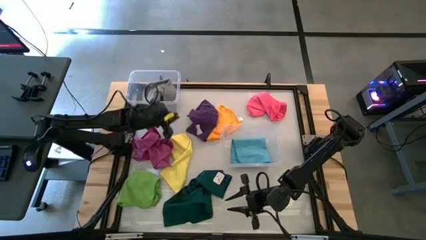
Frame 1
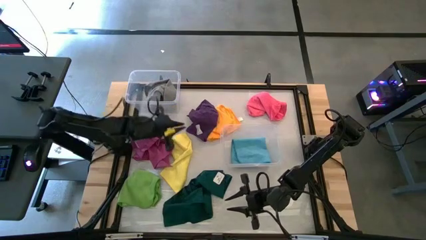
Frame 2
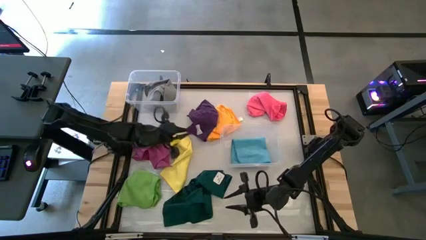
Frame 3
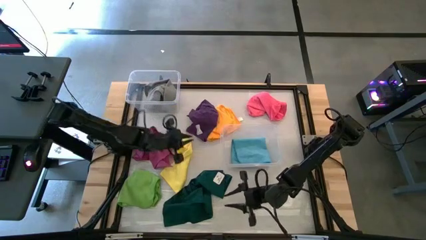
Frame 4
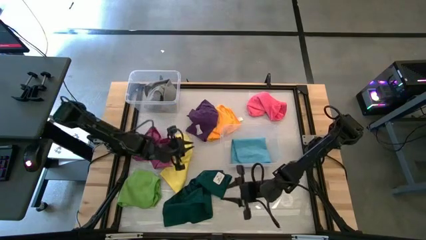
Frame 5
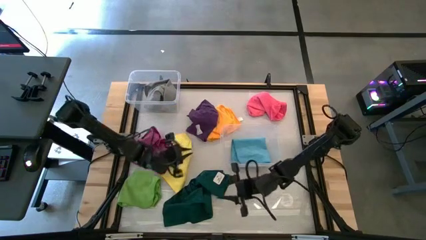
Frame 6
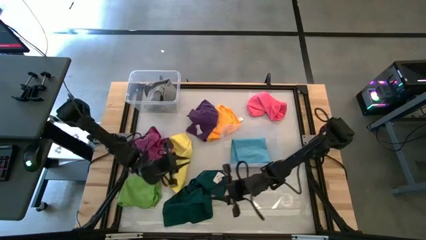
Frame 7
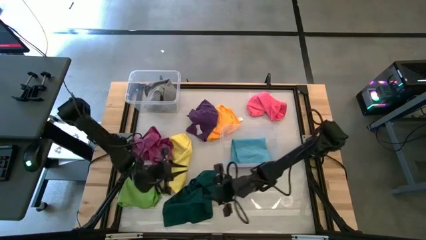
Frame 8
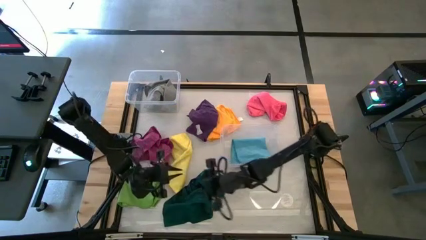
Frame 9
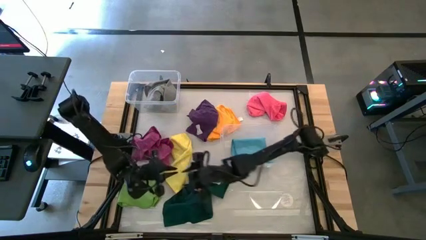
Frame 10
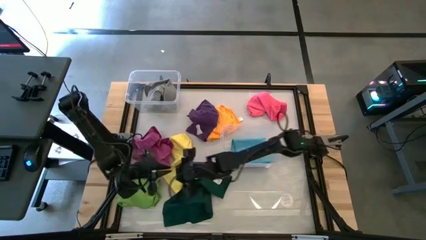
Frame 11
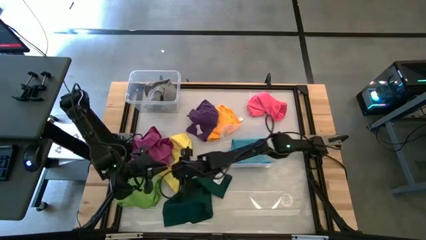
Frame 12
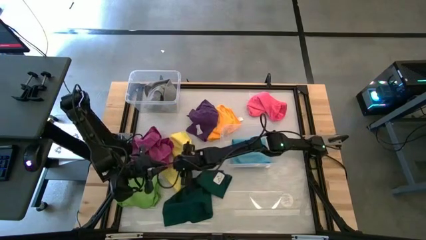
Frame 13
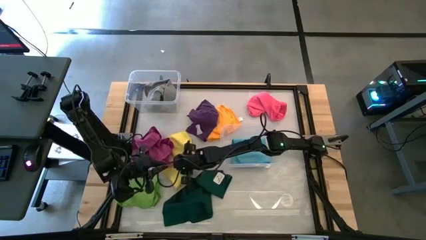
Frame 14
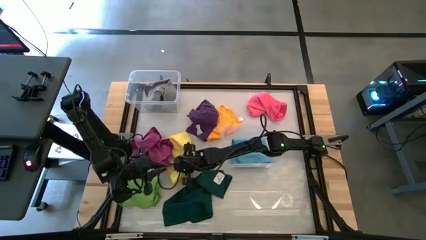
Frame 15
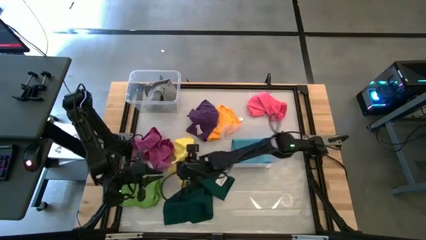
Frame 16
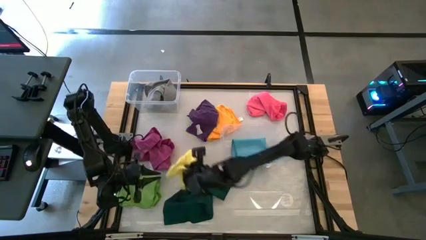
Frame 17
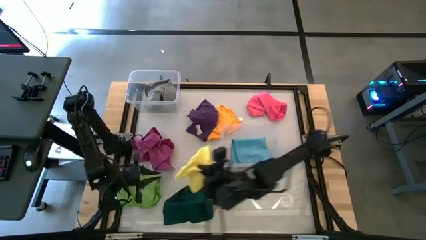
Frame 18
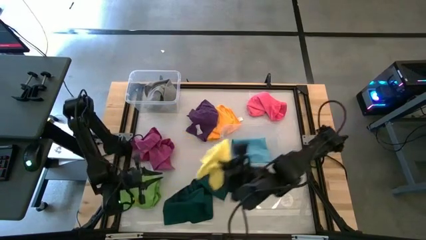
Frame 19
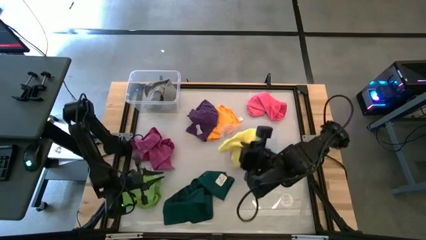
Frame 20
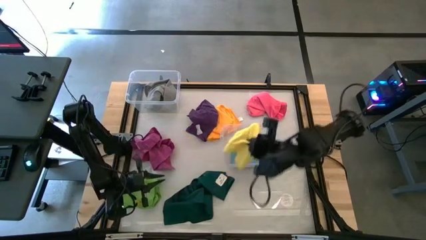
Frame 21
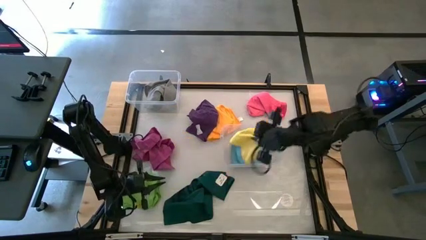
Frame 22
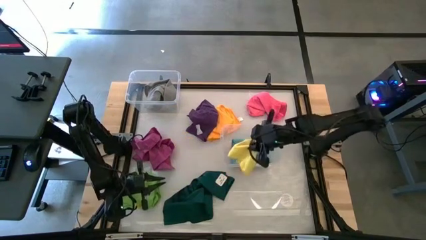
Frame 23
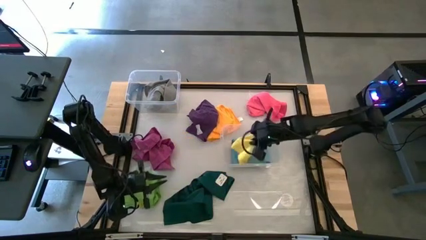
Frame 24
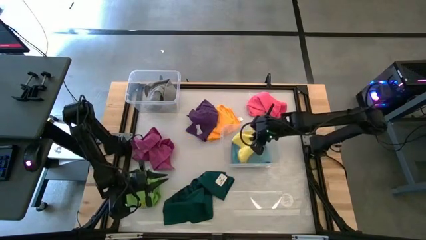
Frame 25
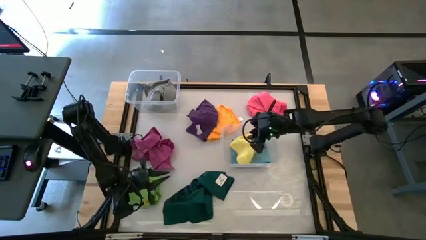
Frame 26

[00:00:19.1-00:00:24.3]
Task: Sort towels by color in basket
Put the yellow towel into the bottom transparent bin

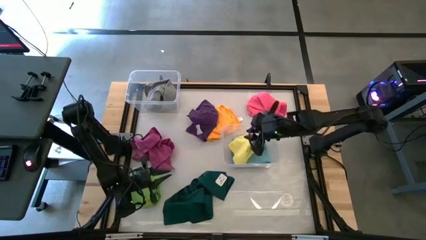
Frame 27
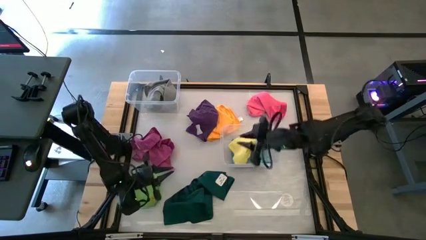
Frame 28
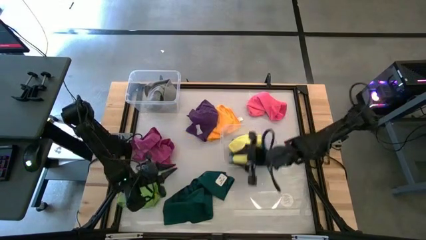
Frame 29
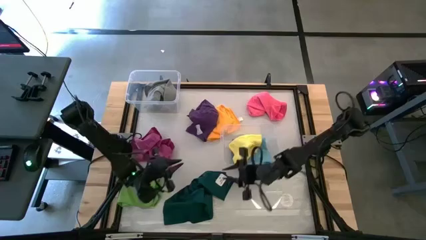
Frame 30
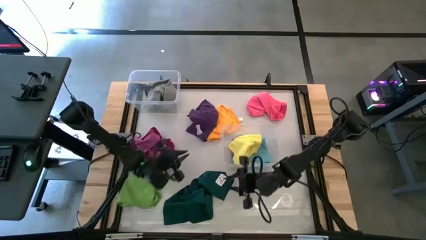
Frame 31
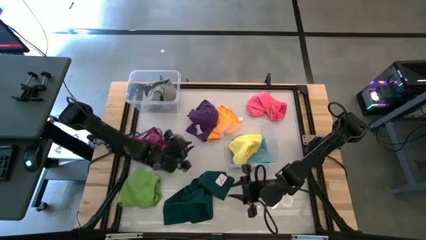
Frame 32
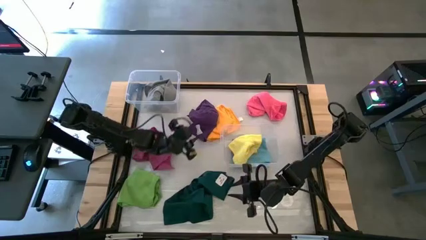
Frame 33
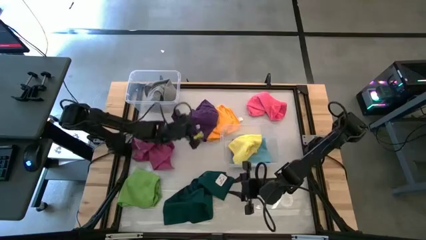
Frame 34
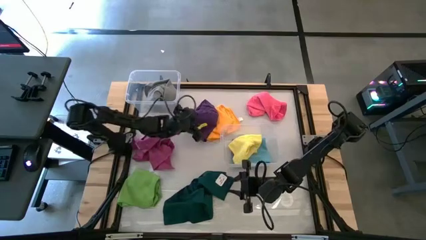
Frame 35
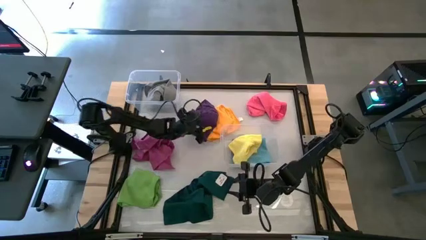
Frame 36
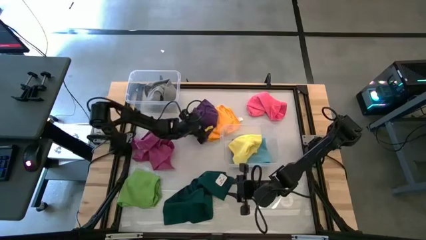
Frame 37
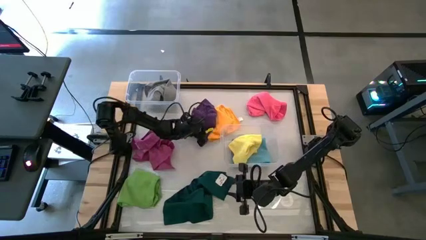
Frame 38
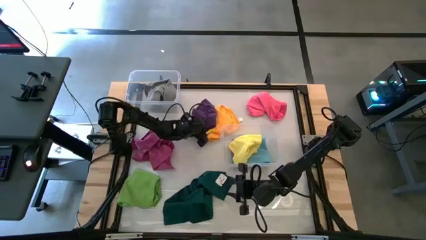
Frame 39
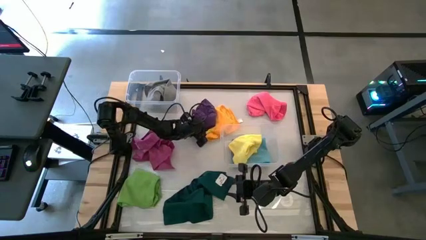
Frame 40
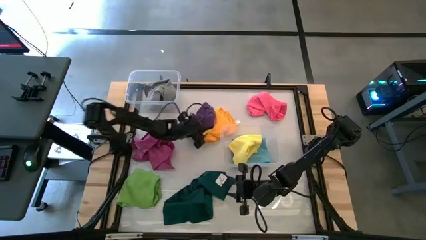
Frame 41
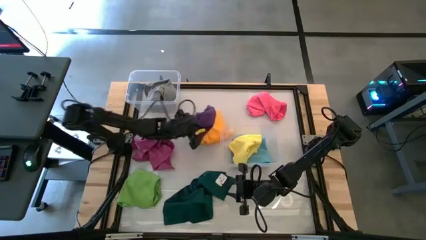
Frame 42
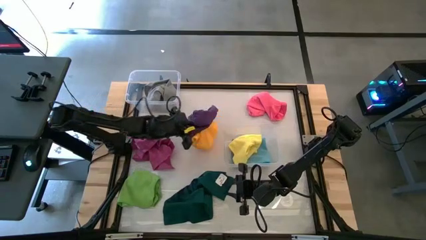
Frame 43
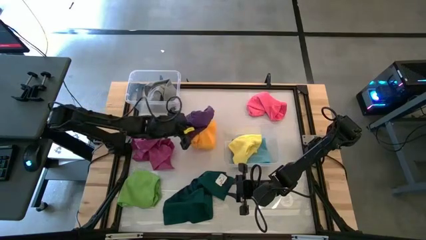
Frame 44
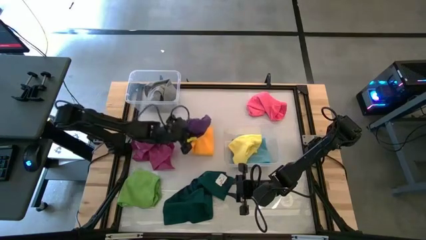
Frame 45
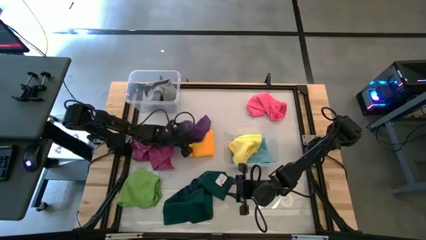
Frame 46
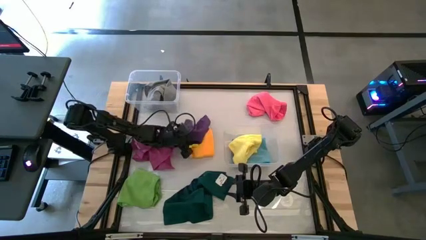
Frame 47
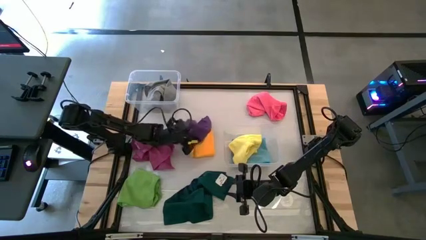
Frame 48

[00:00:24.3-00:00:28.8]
Put the violet towel into the top transparent bin

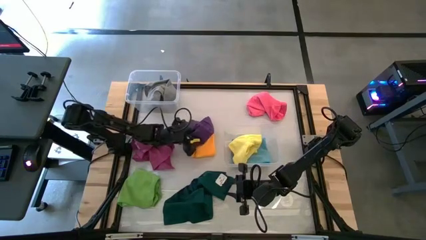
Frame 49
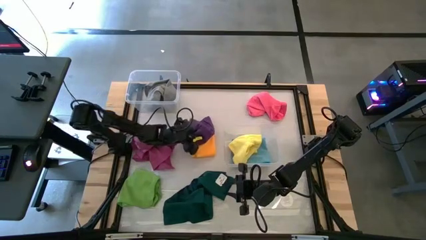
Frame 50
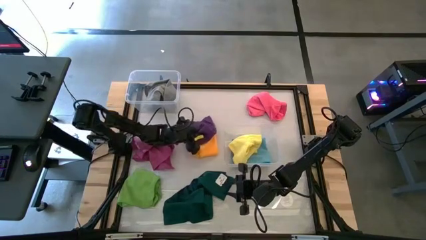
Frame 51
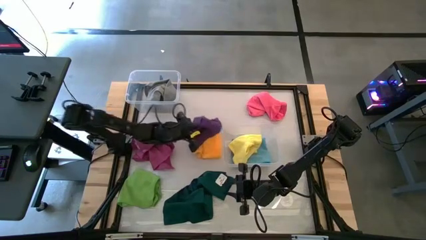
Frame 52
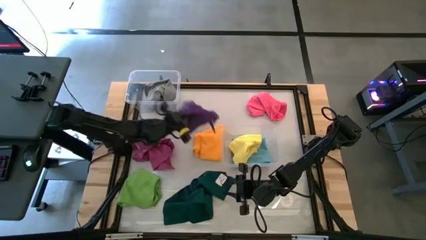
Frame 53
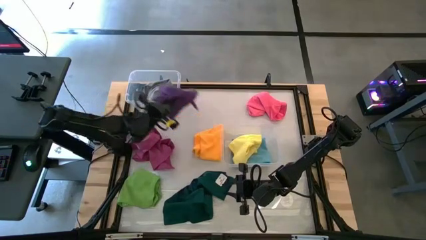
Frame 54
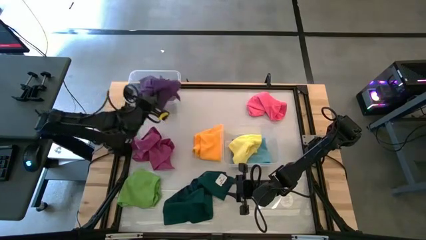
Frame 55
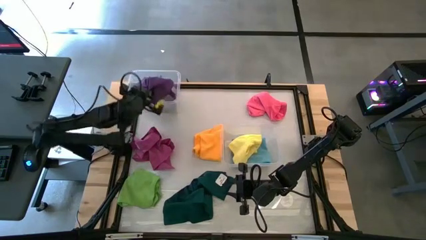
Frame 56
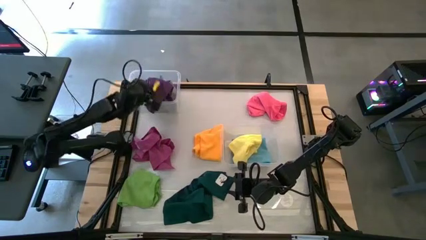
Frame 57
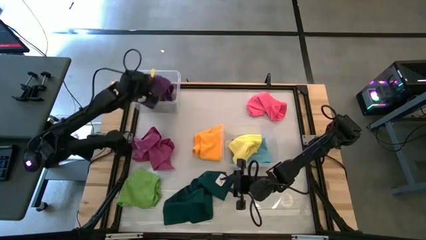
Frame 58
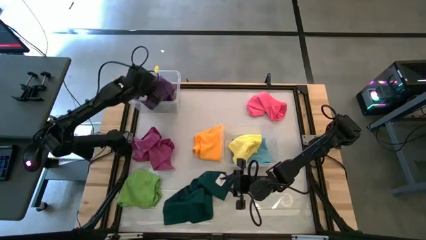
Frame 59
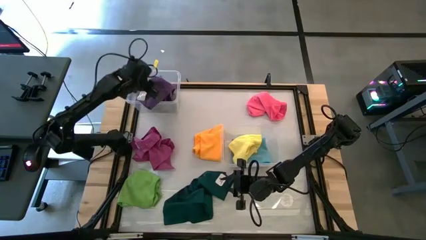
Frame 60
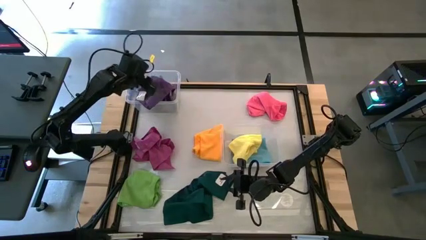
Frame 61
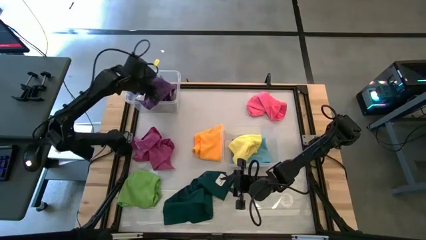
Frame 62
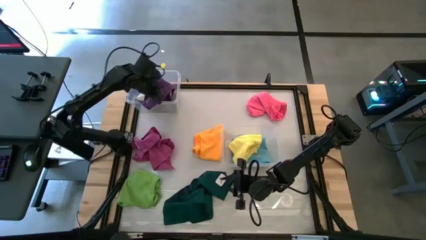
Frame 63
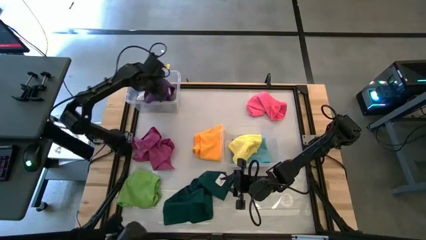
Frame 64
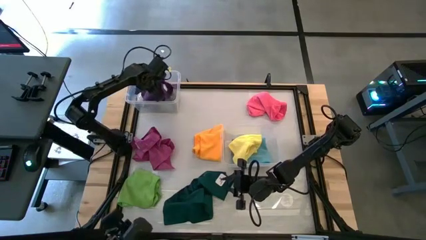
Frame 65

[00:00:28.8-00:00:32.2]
Put the violet towel into the top transparent bin

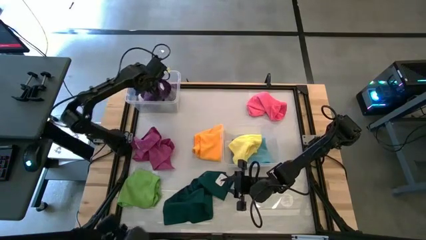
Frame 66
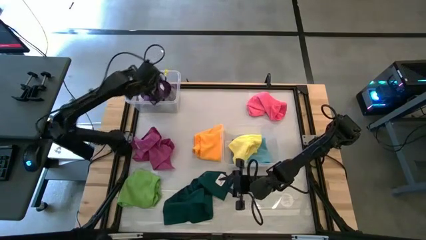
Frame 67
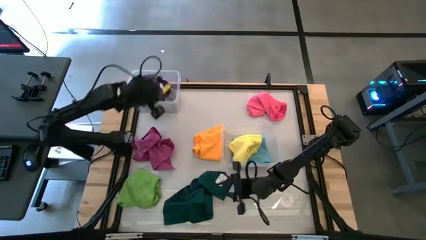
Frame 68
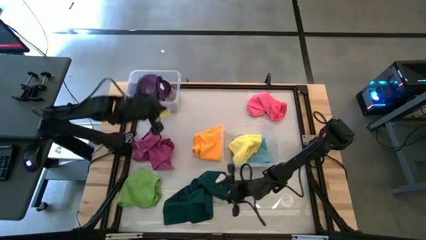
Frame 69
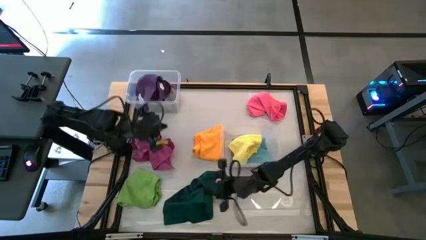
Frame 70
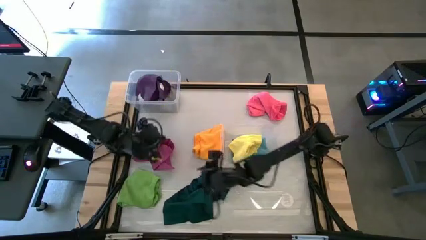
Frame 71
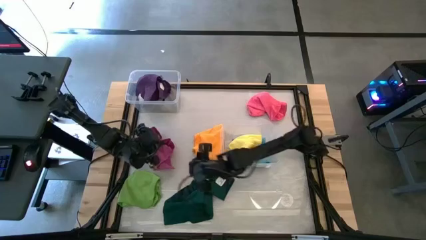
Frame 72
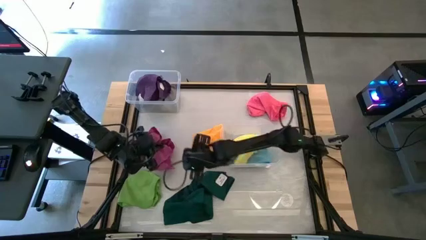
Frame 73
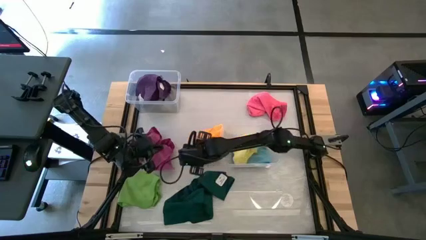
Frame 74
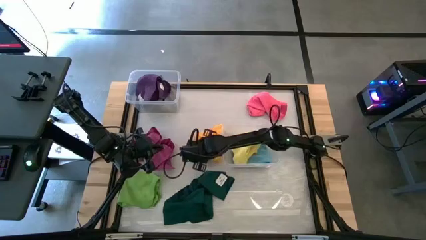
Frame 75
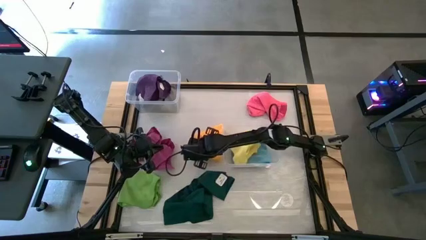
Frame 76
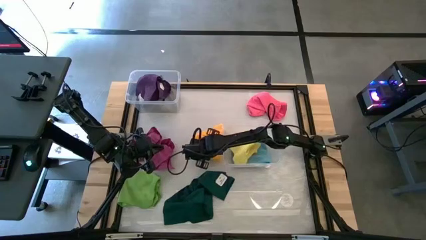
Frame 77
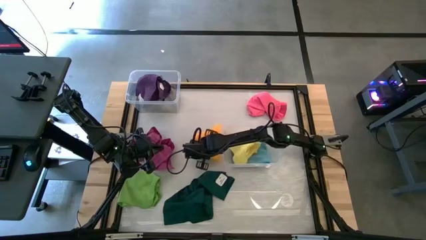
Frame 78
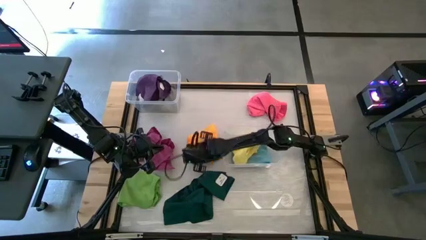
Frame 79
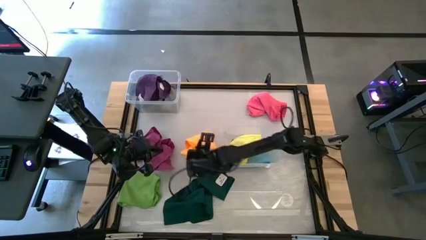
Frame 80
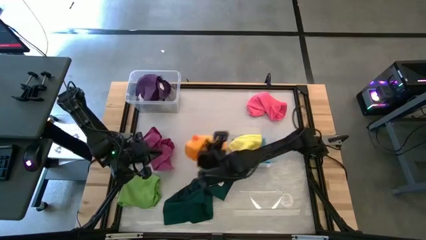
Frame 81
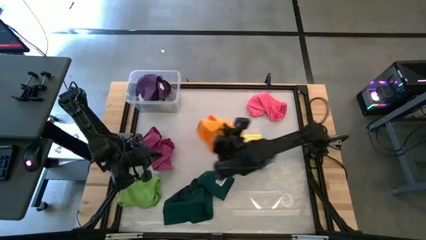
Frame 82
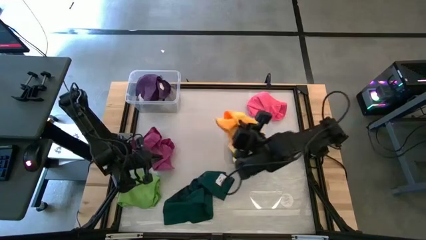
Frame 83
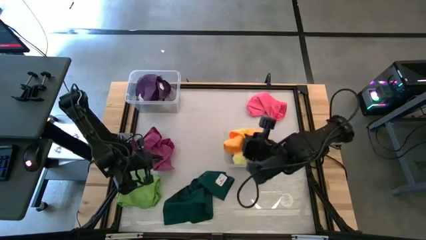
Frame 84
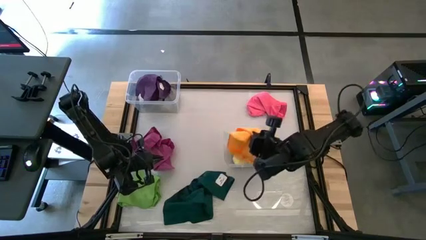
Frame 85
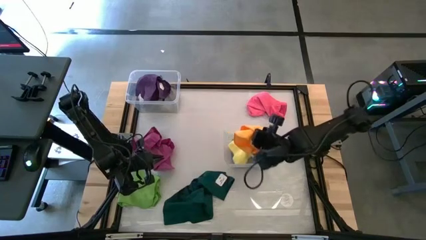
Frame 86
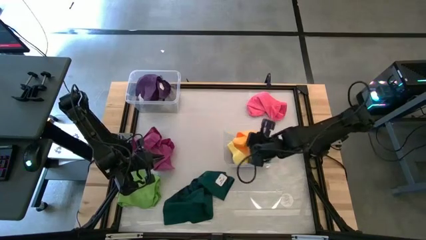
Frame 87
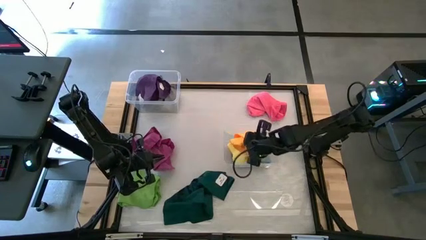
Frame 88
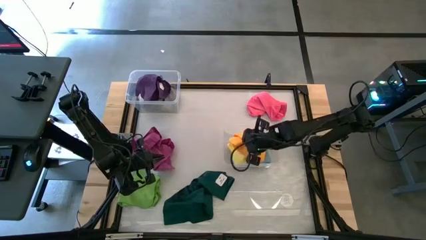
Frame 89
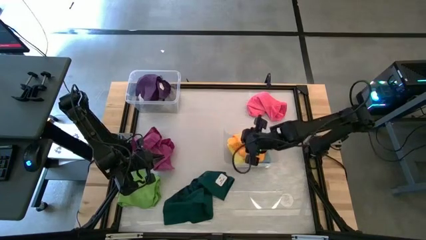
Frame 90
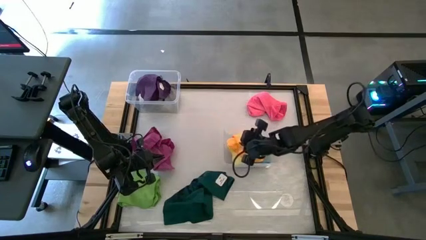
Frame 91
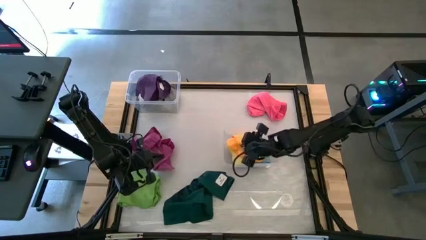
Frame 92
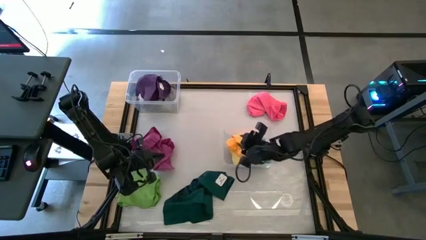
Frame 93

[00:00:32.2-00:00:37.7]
Put the orange towel into the bottom transparent bin
